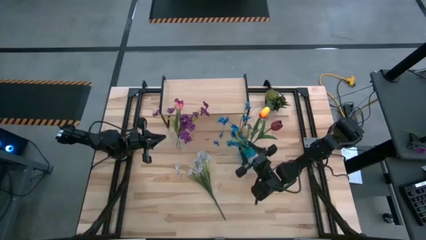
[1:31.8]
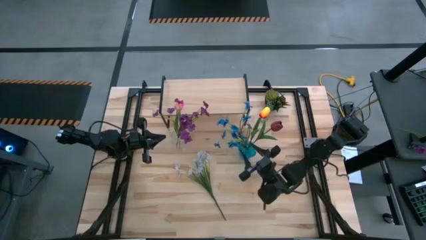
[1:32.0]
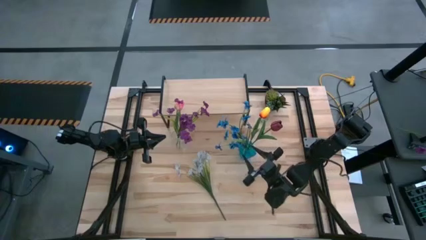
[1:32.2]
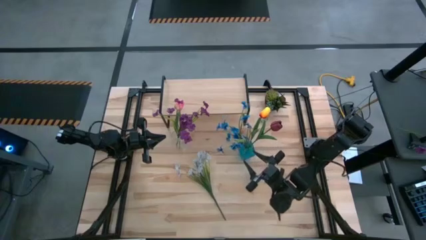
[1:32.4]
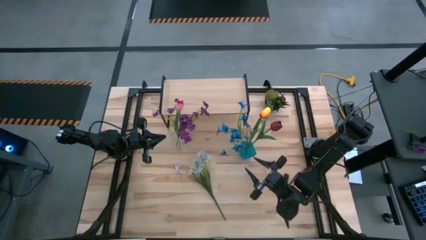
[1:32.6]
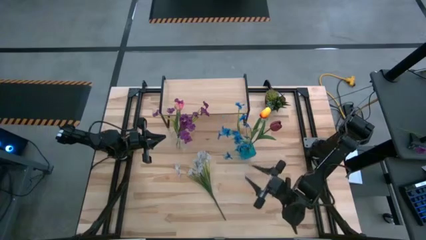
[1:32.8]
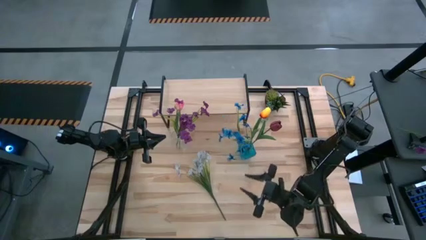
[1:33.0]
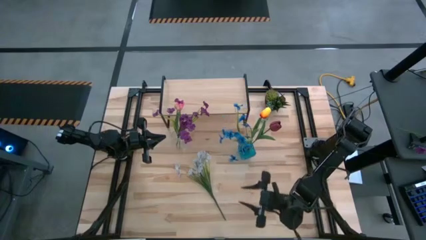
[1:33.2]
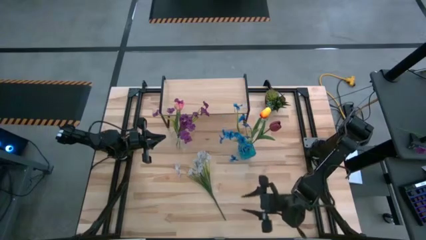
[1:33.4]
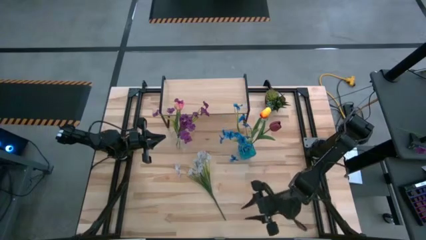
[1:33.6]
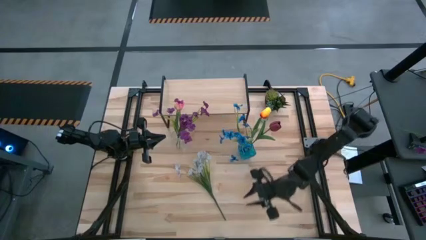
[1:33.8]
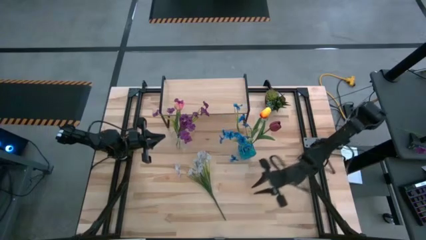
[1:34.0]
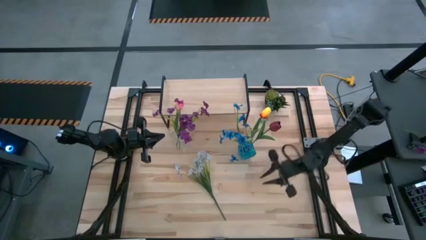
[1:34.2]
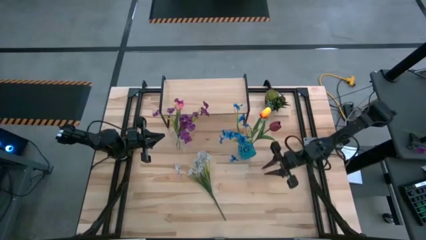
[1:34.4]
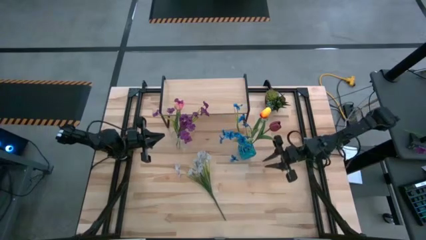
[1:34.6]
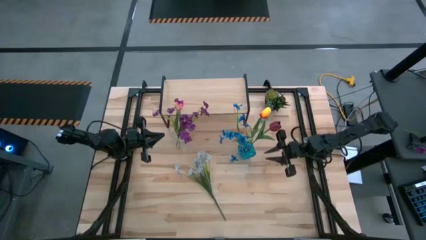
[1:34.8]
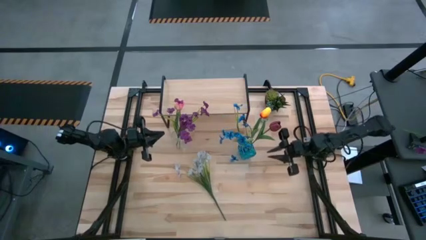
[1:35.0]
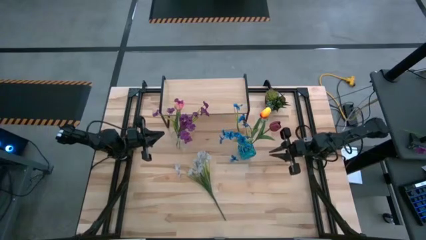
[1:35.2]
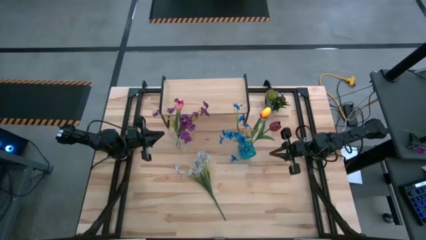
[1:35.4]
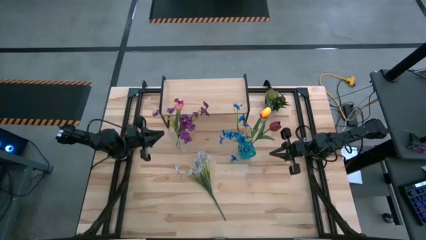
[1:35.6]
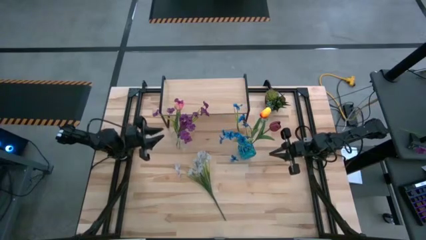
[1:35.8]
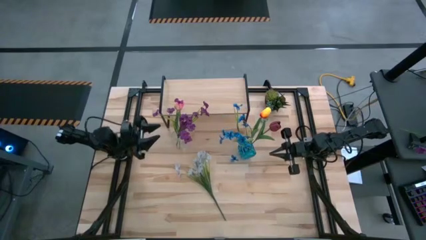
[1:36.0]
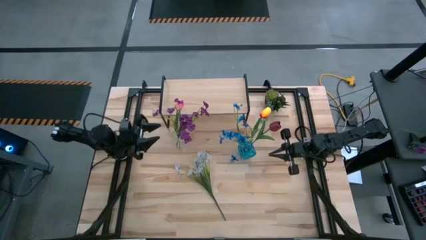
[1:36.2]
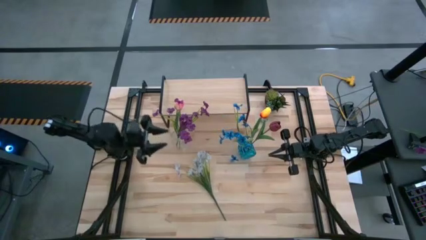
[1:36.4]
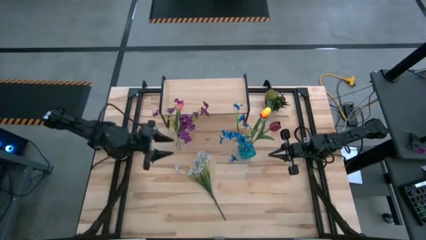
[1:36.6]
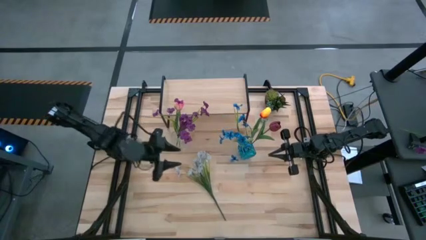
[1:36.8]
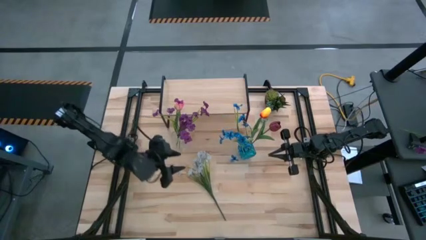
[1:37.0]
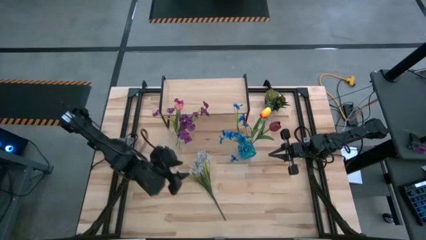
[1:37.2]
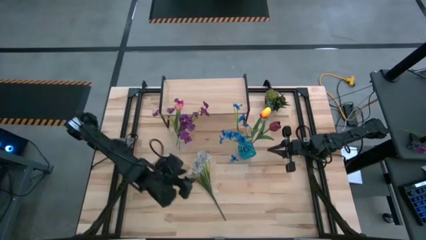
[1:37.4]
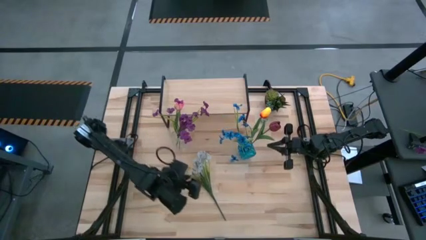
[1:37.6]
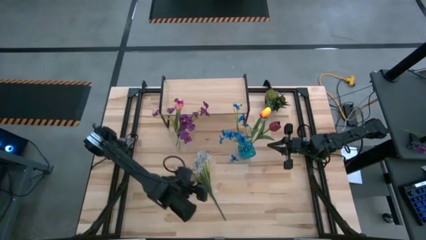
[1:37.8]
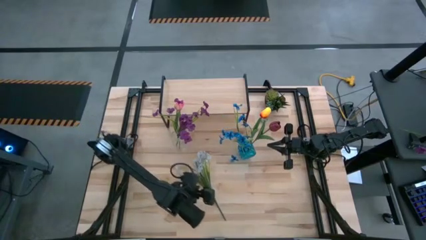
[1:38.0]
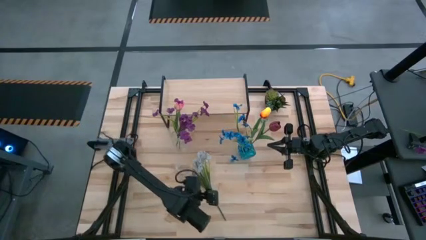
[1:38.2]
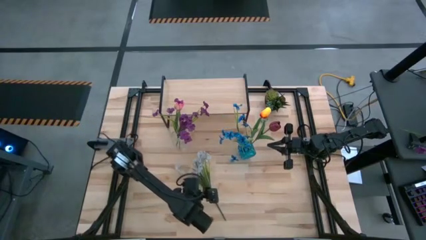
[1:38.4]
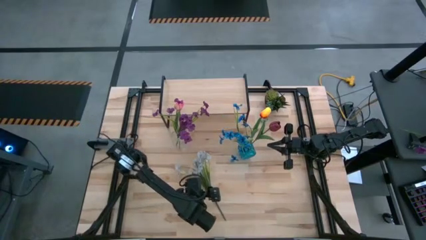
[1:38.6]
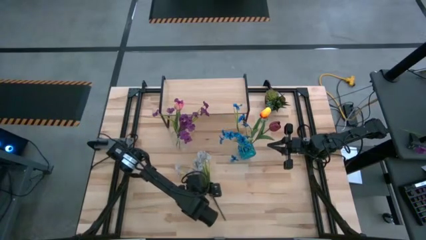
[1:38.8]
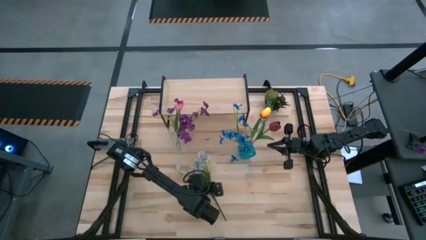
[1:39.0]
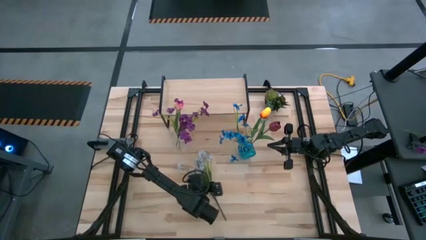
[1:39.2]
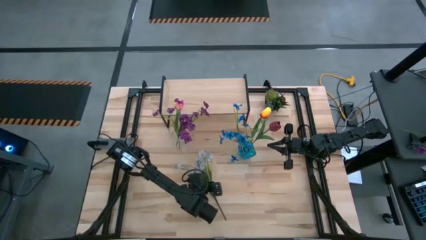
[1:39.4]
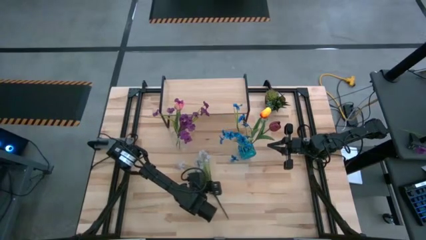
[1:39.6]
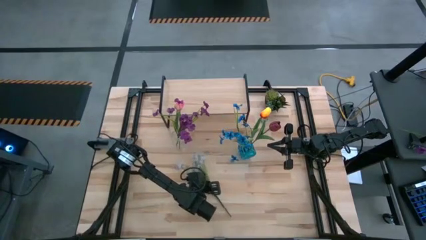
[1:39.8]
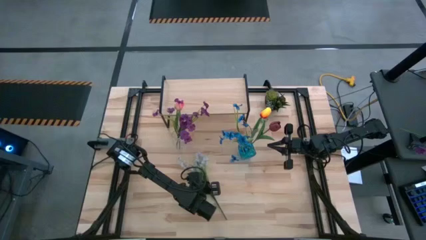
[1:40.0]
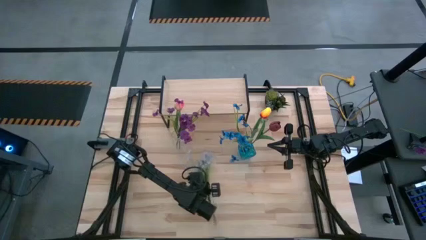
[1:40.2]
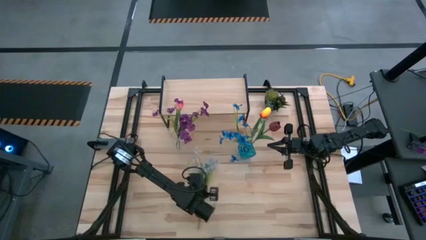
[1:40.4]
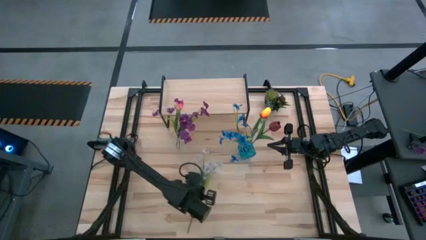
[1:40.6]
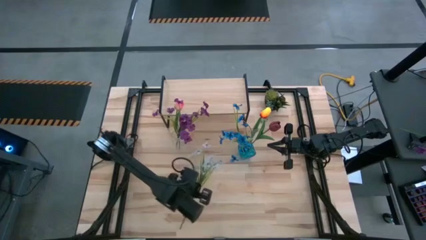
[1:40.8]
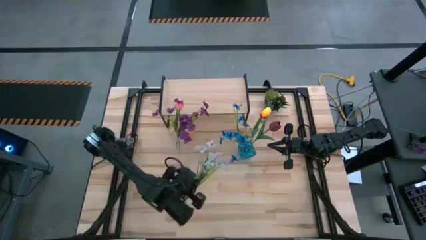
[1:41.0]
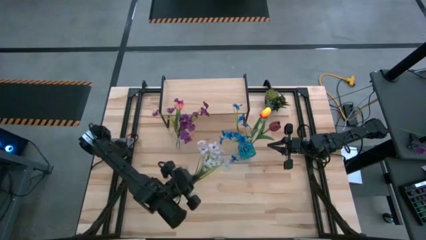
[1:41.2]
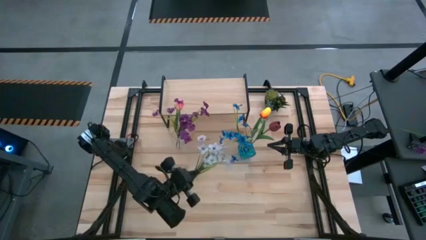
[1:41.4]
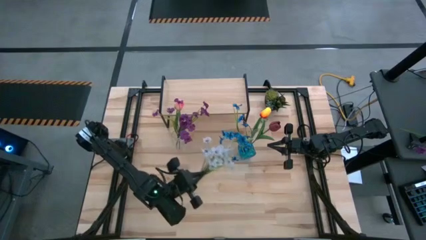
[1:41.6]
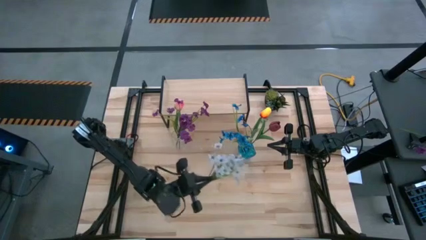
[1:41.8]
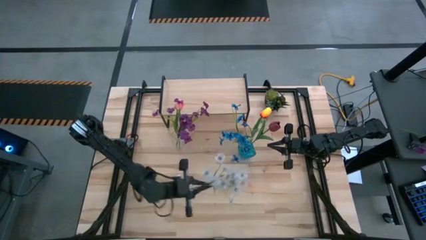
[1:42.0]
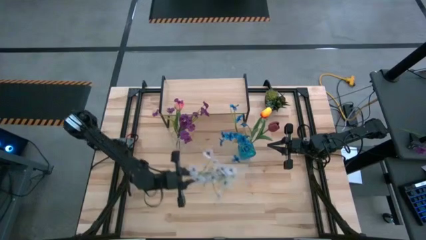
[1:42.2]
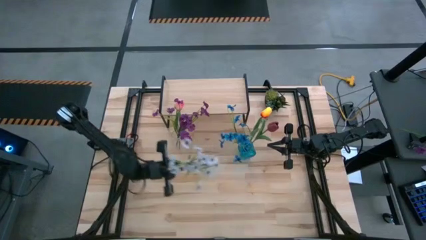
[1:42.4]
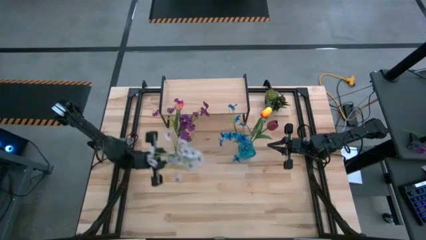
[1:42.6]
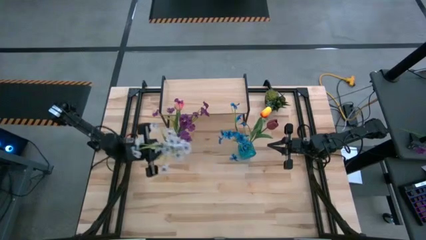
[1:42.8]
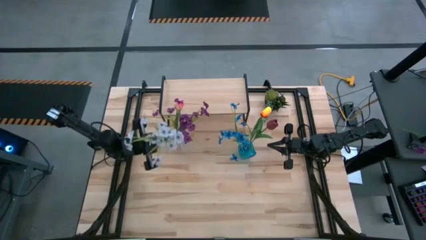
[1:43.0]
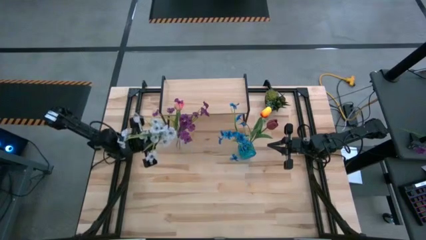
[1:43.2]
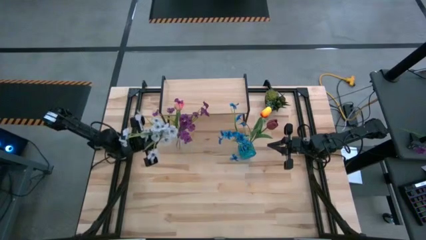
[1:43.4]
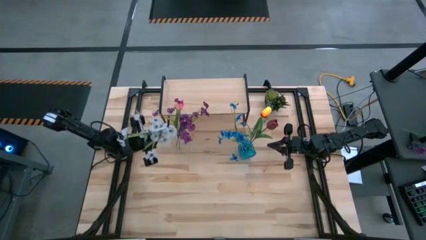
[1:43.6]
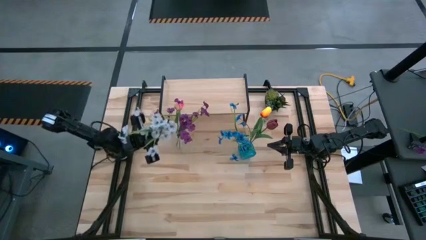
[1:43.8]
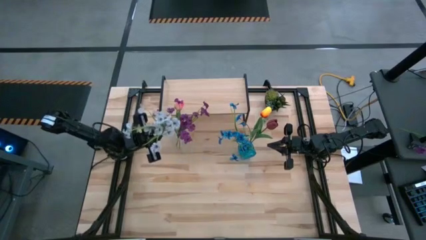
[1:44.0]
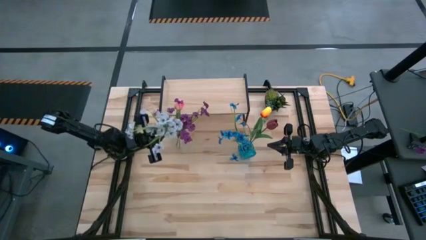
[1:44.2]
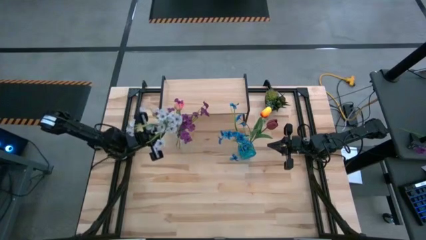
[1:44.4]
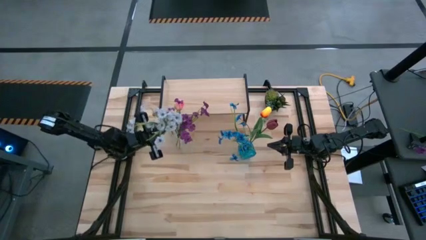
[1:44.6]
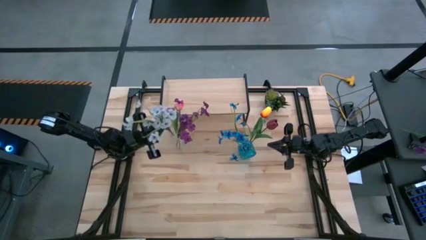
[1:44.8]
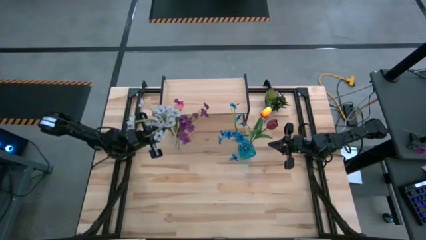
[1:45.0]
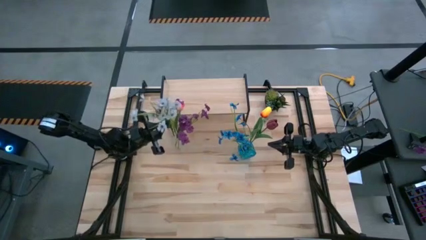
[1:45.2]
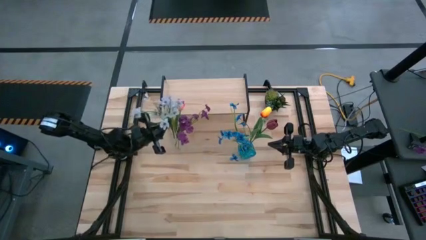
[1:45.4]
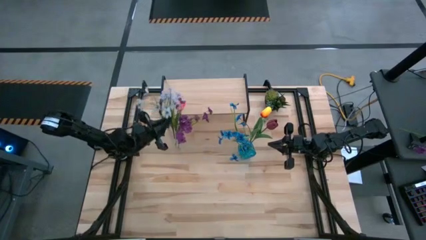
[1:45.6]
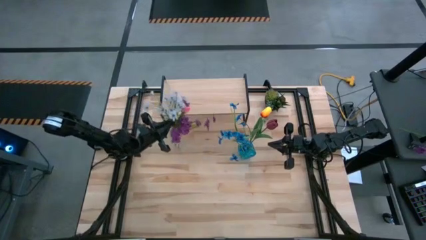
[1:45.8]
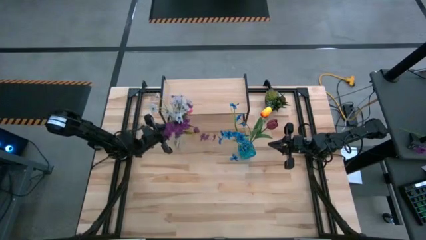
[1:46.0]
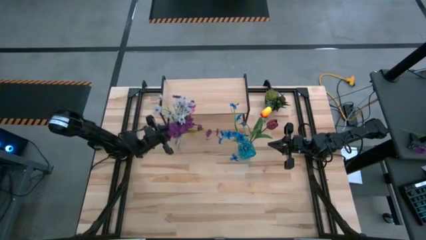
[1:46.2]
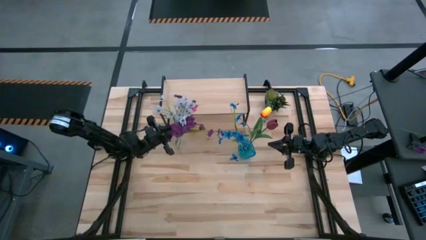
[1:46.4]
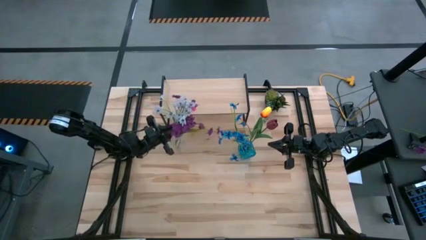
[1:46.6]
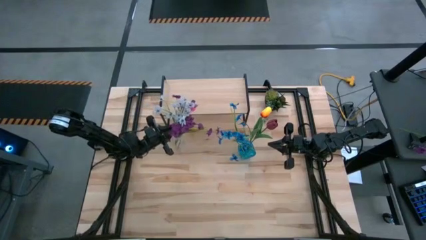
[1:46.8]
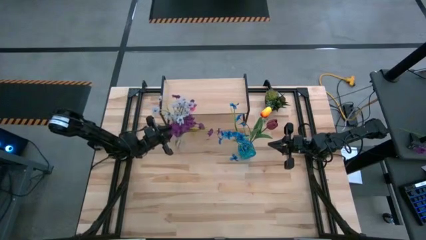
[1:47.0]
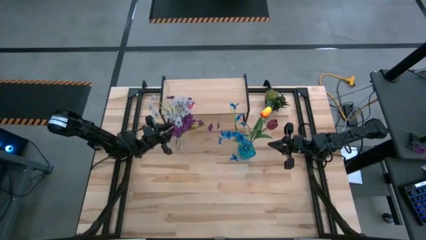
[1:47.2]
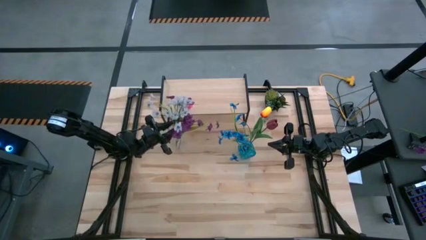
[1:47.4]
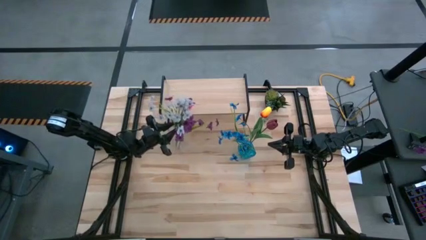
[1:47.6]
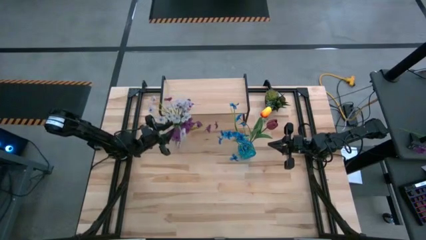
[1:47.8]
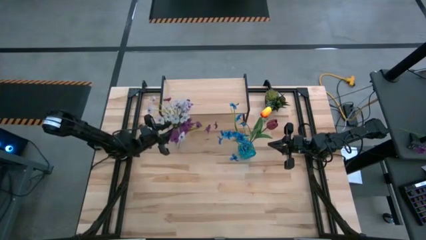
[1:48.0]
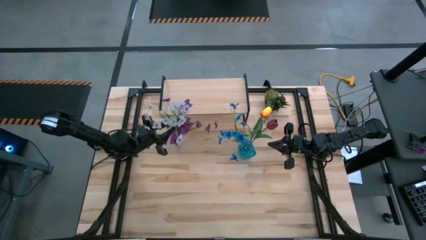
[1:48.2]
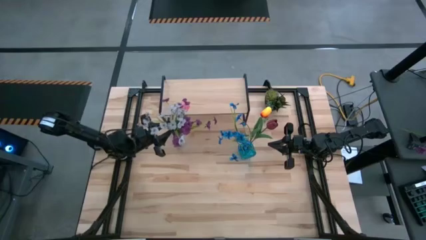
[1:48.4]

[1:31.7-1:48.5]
Task: Pick and place flowers into a vace then onto a shelf
Put the white flower into the transparent vase
